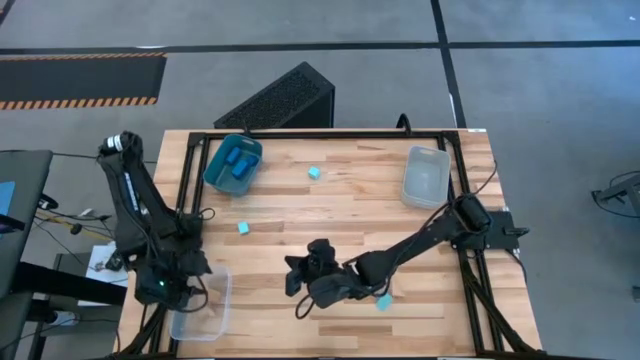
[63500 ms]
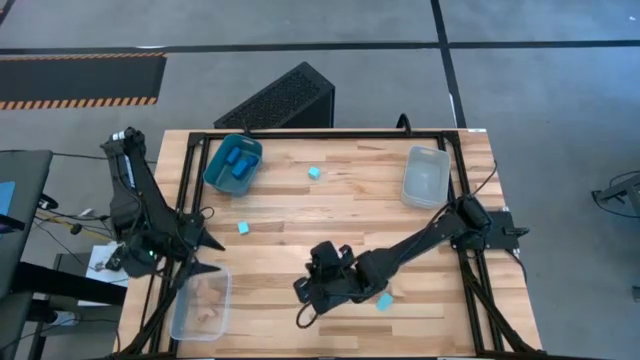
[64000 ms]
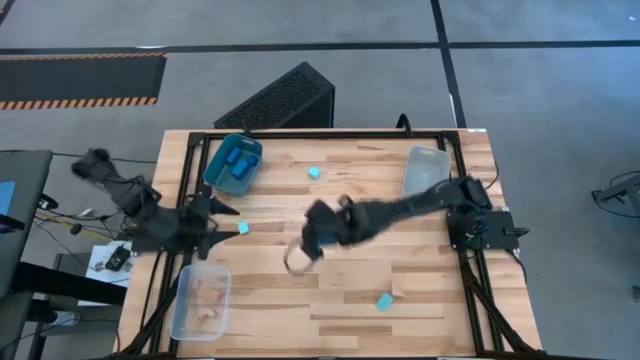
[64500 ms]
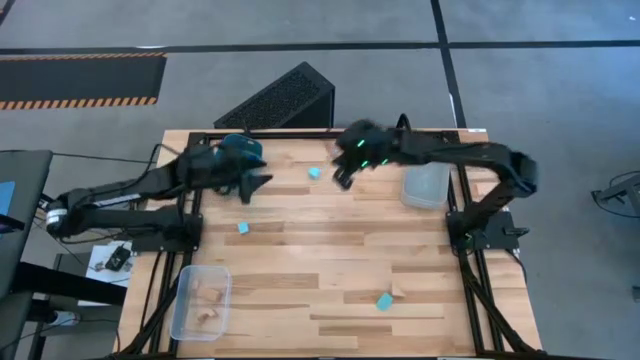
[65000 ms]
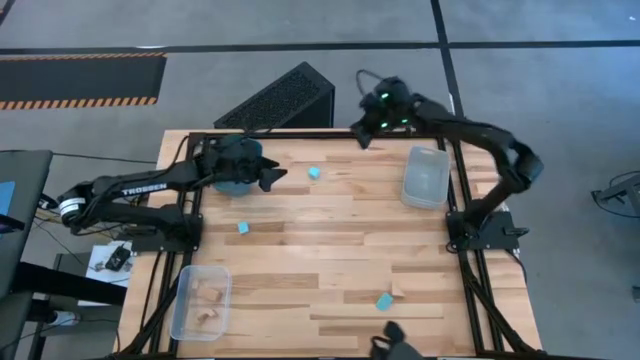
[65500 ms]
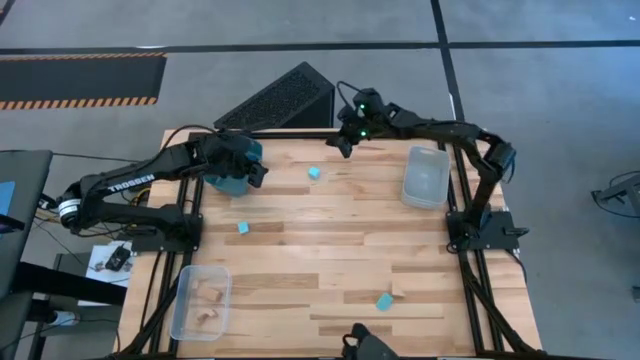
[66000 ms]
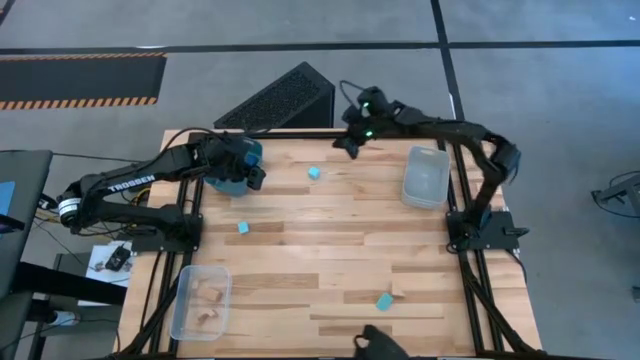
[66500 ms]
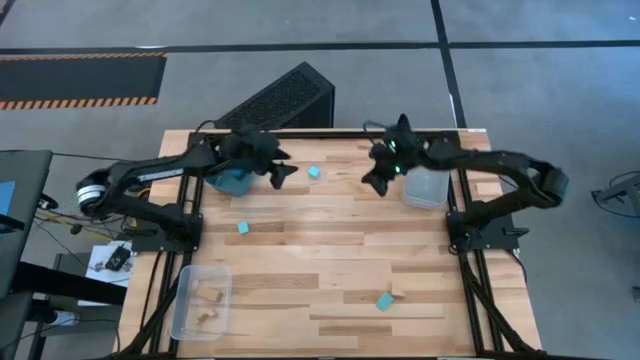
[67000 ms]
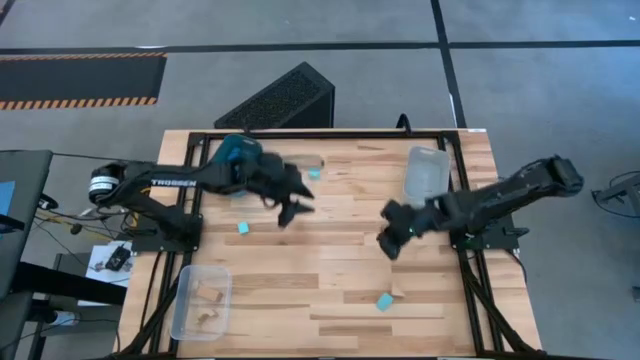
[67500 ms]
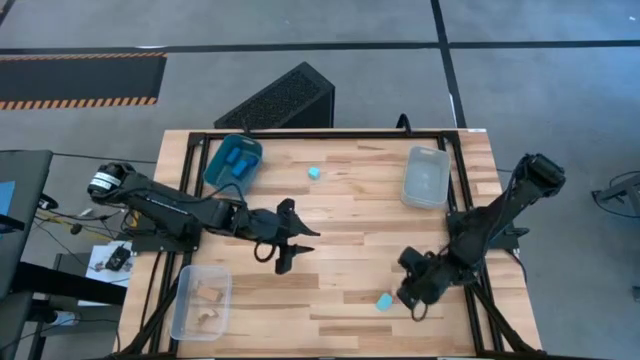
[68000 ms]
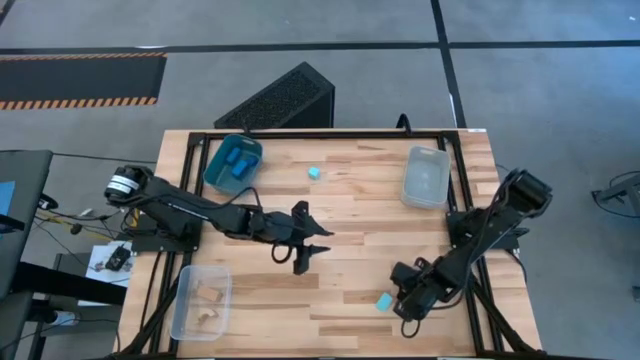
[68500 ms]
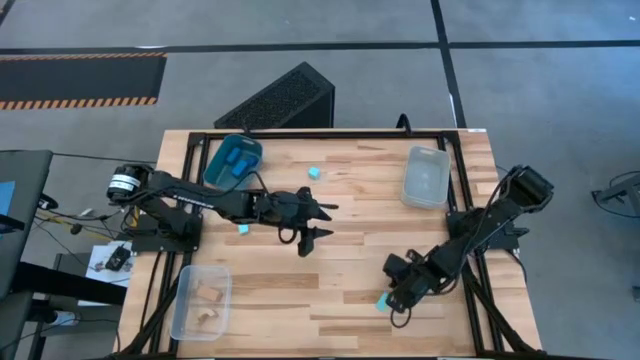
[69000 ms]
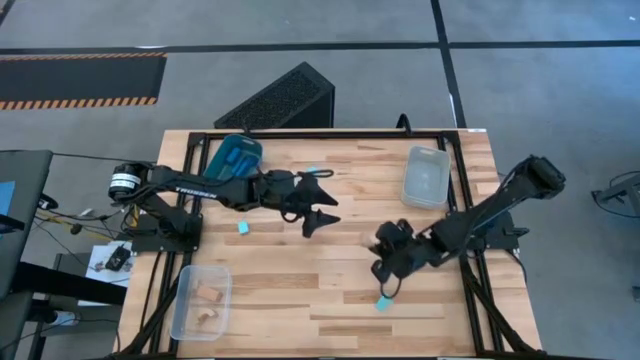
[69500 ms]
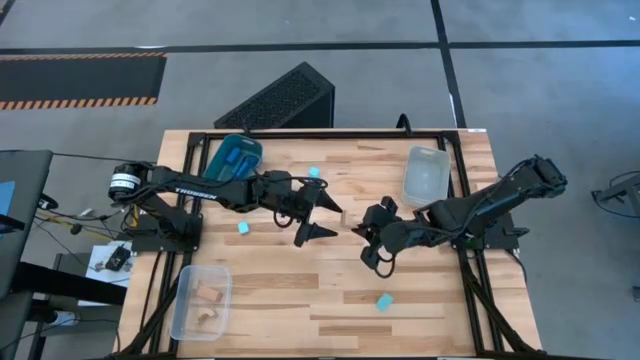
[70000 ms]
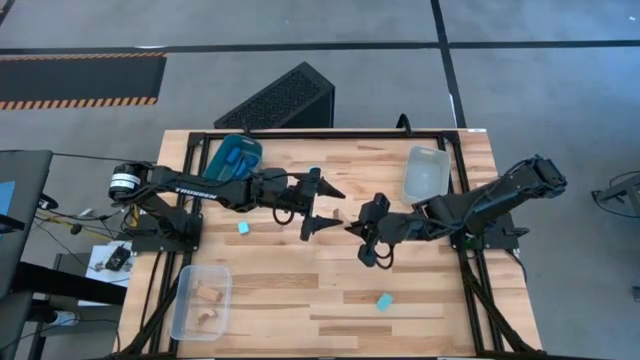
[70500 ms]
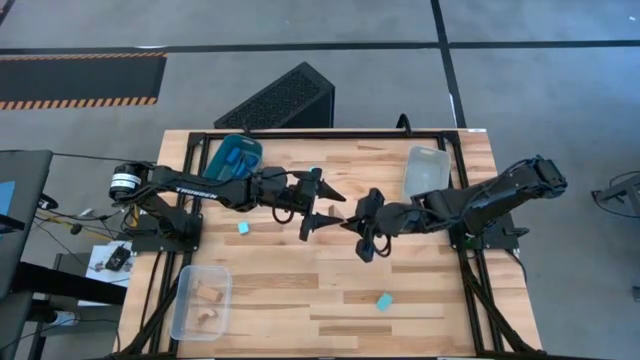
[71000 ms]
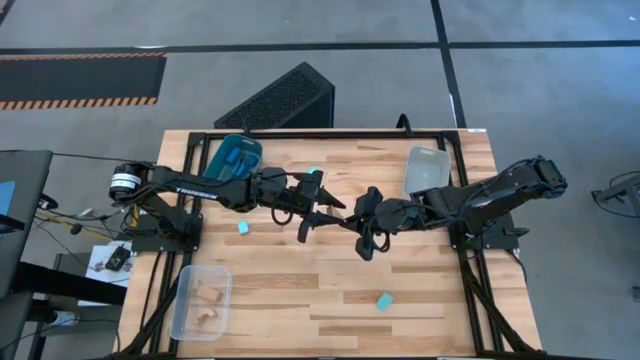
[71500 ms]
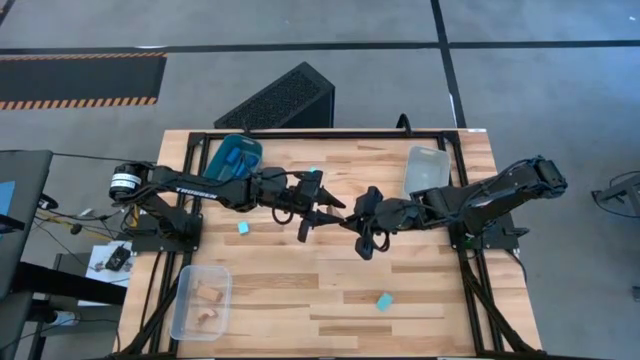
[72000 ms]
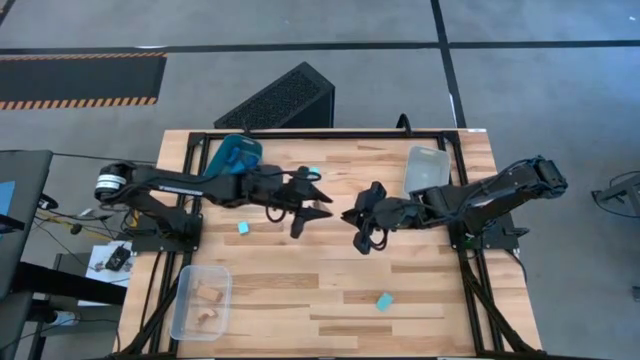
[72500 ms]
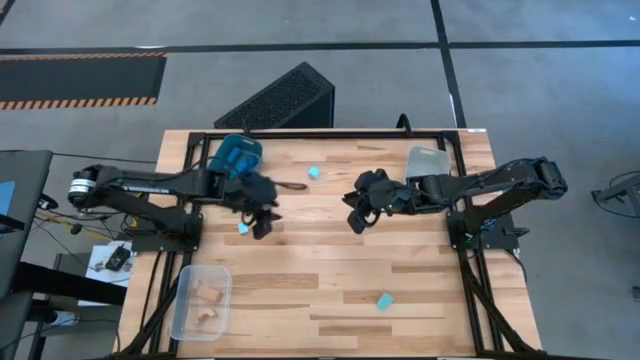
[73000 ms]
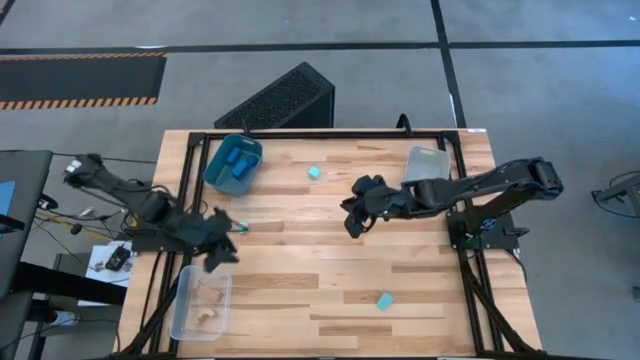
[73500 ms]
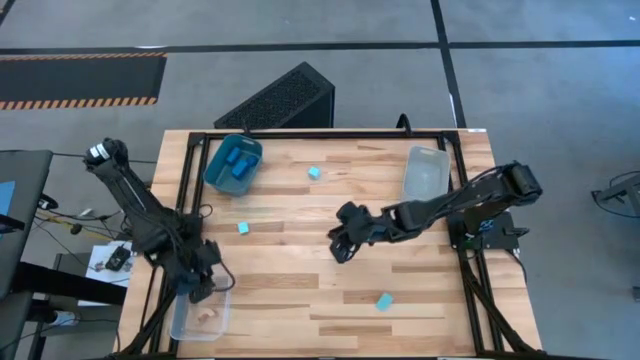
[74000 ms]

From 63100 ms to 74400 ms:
Task: Sort & place blocks by color
Put the brown block into the transparent bin

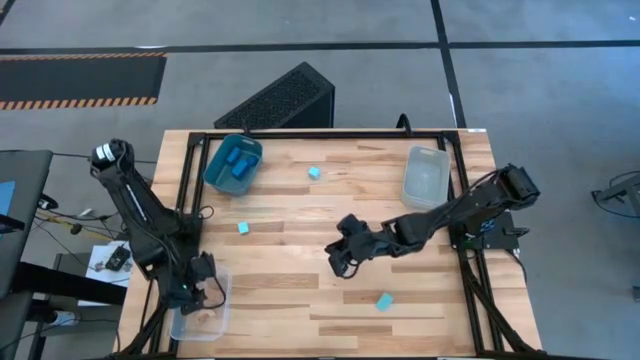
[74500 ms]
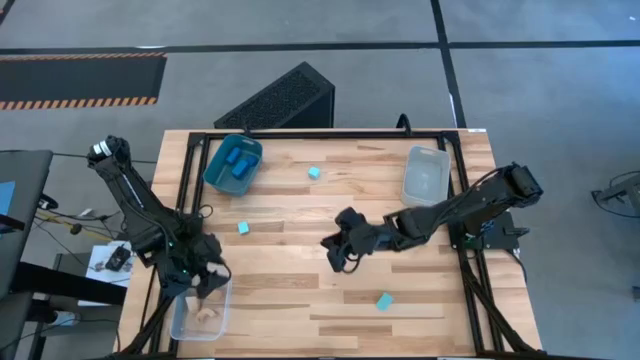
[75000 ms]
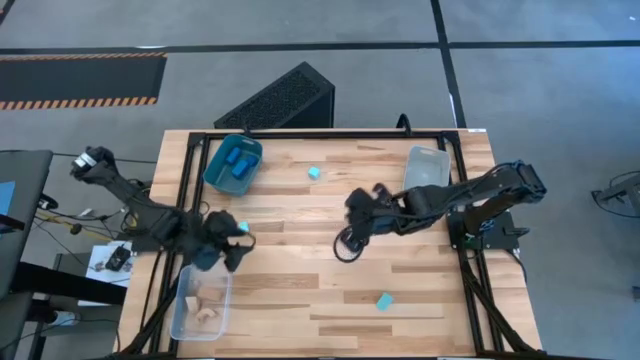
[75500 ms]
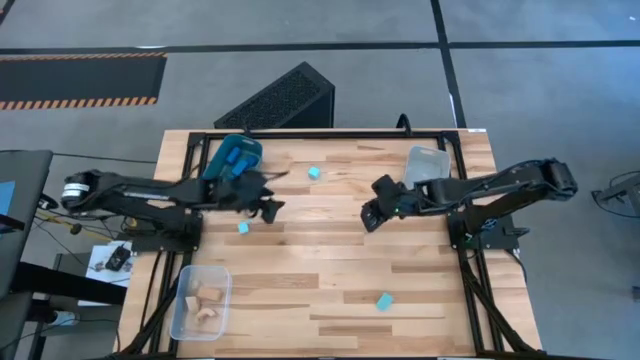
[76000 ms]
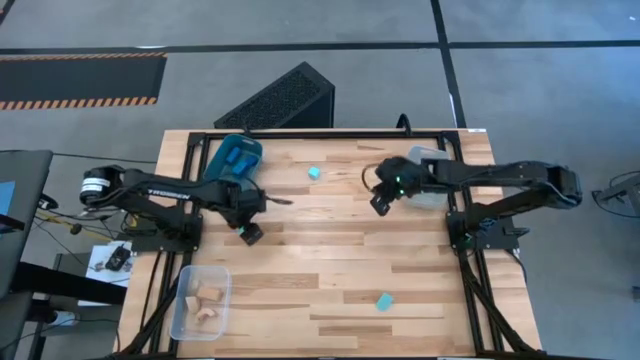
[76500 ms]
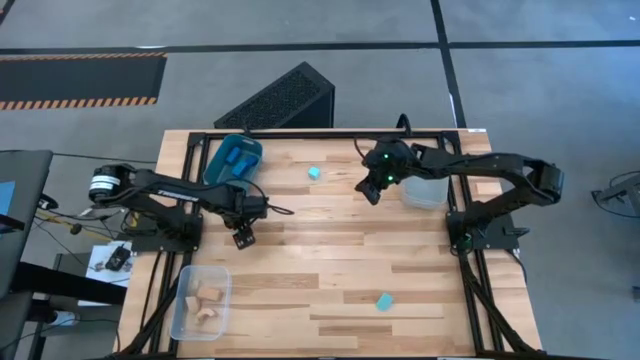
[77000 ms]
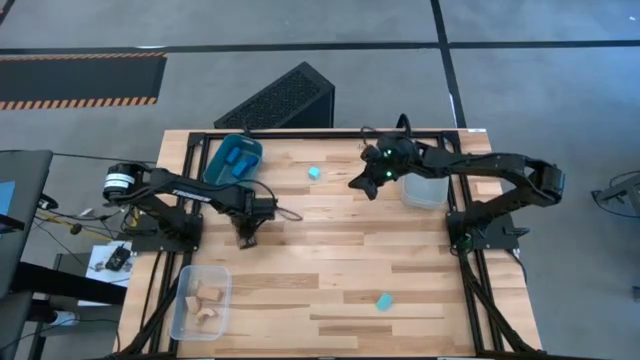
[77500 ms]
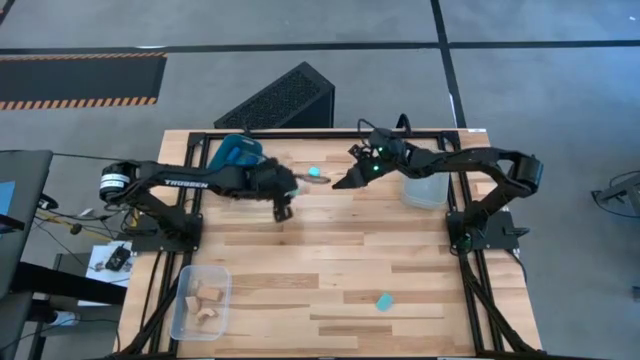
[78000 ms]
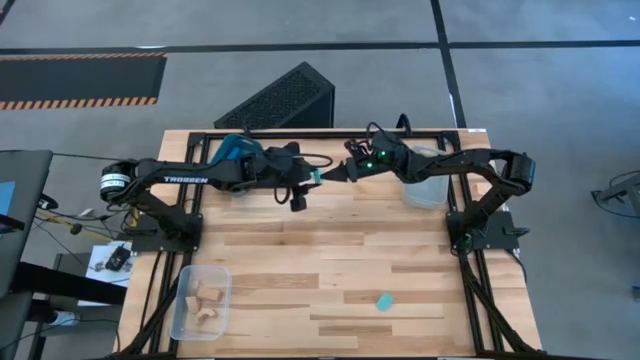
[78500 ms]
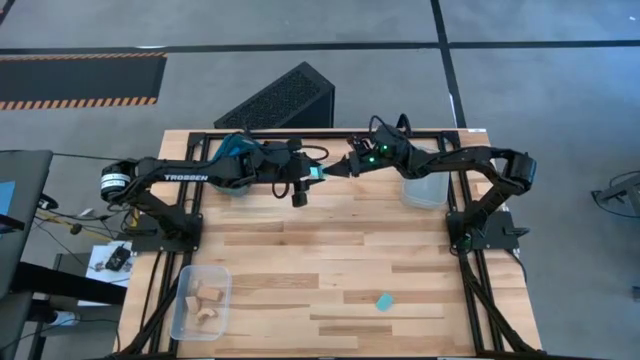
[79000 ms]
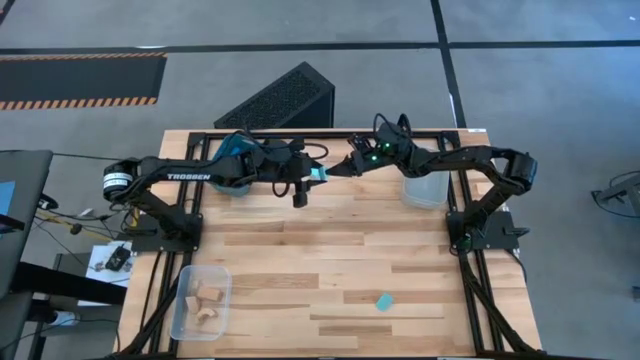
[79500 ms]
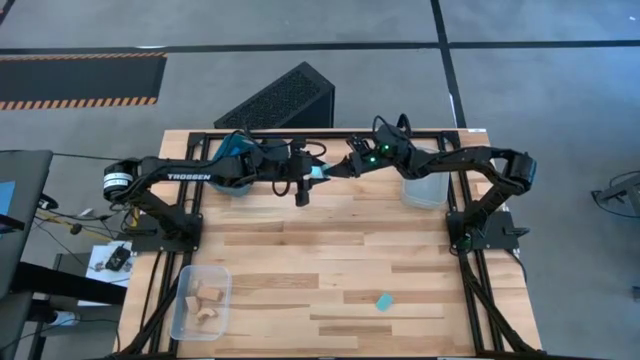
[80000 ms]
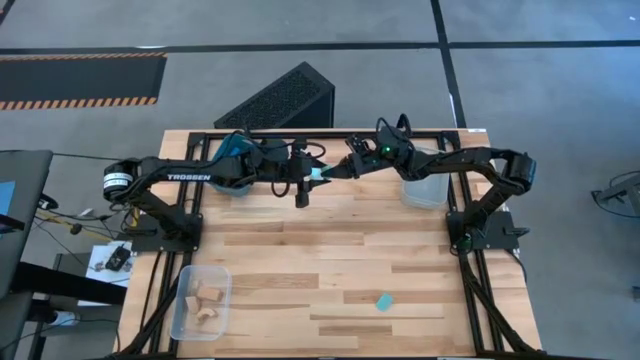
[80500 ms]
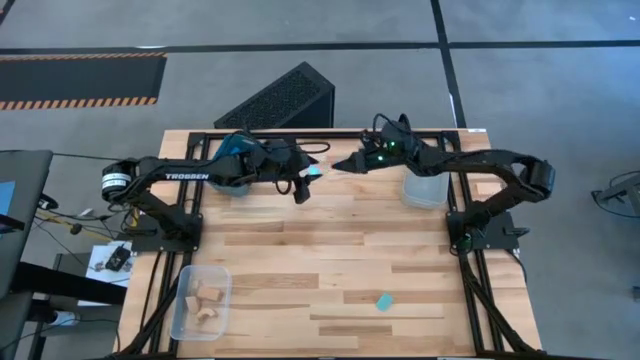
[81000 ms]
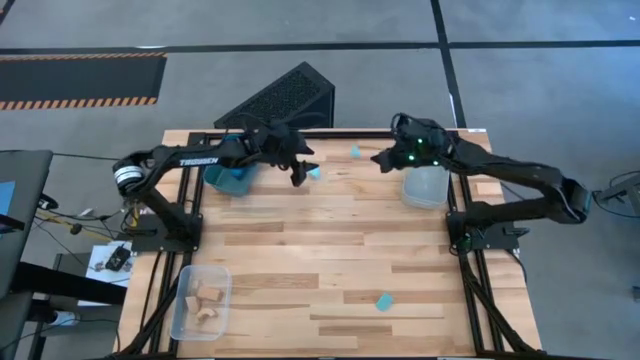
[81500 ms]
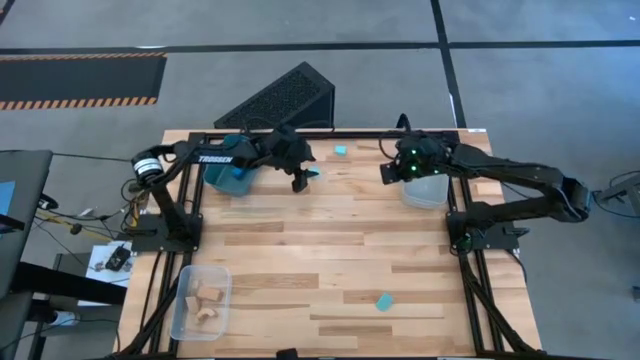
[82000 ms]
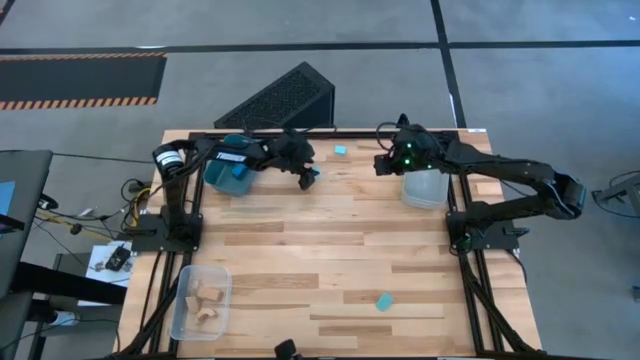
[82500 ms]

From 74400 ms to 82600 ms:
Put the middle light blue block into the gray bin

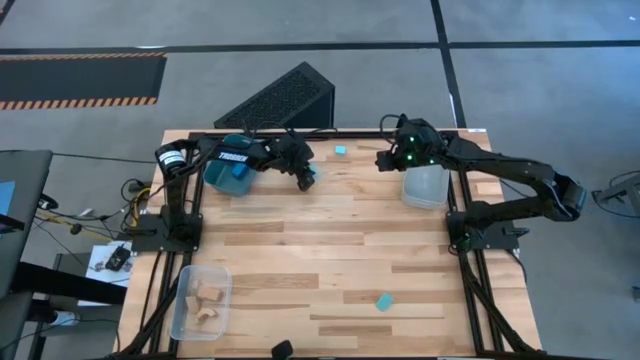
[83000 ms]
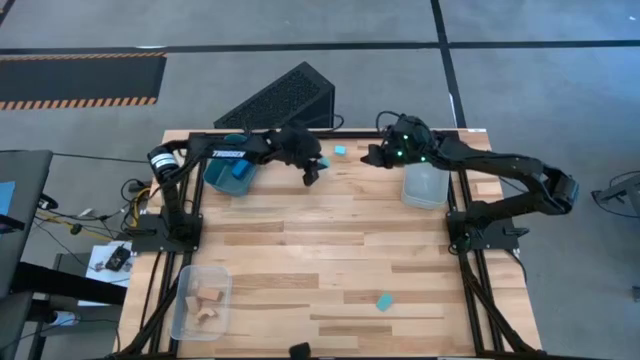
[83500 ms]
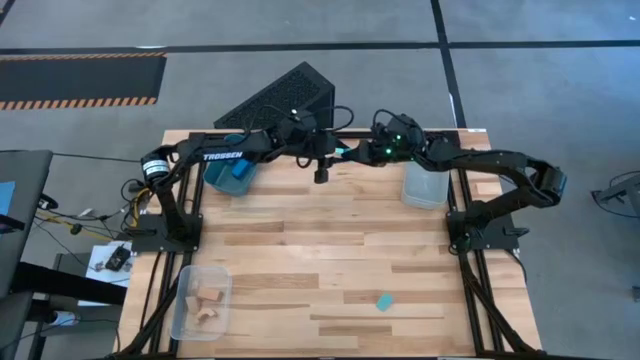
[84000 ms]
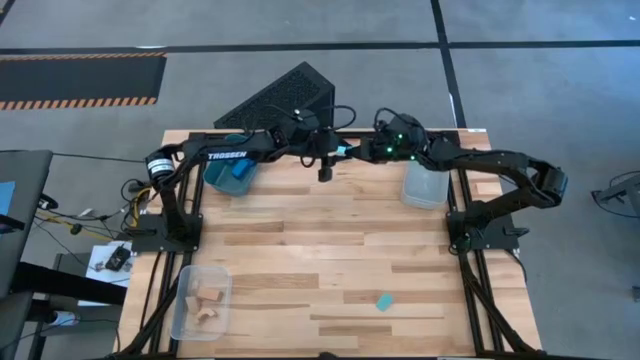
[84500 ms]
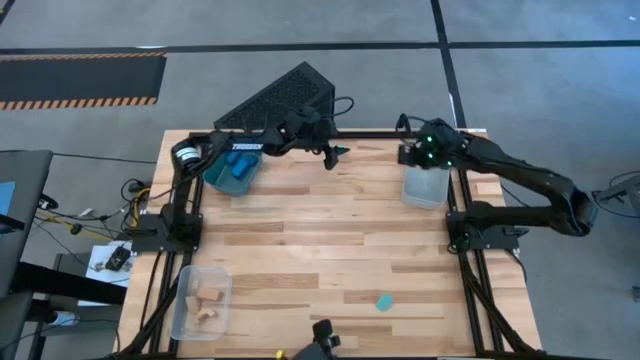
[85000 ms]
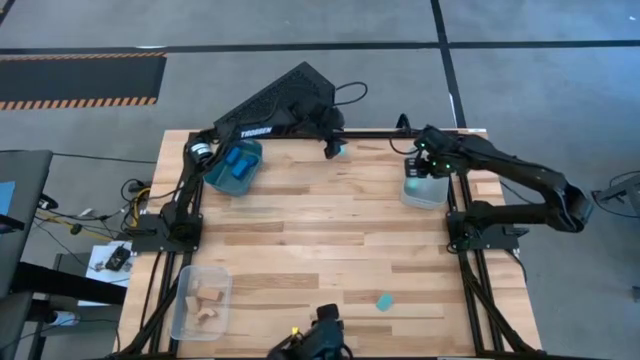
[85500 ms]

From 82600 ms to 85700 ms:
Put the middle light blue block into the gray bin
